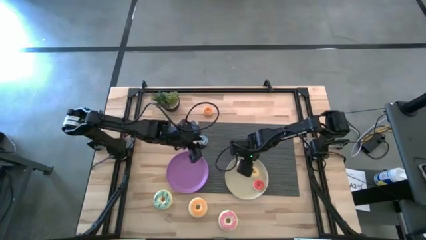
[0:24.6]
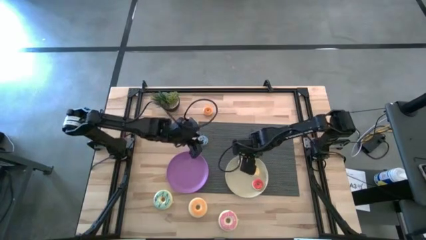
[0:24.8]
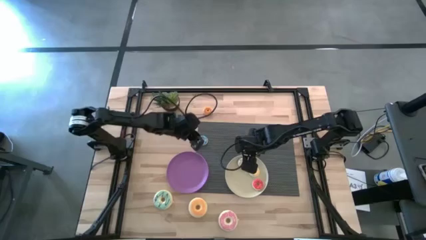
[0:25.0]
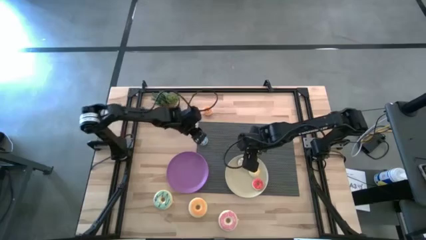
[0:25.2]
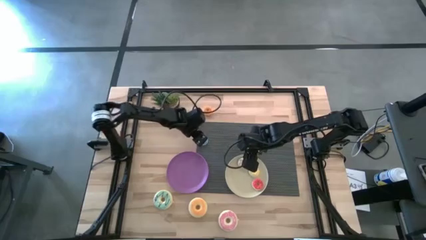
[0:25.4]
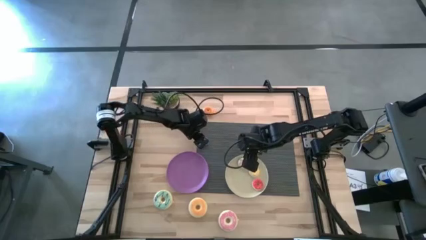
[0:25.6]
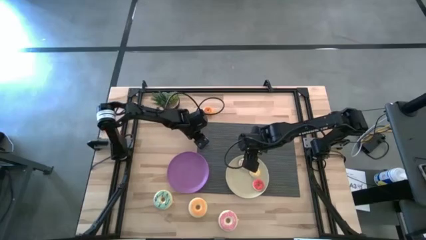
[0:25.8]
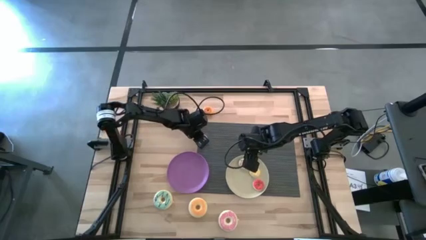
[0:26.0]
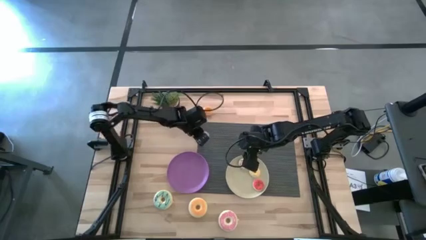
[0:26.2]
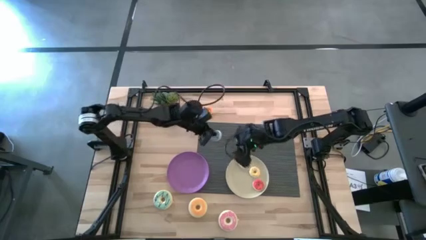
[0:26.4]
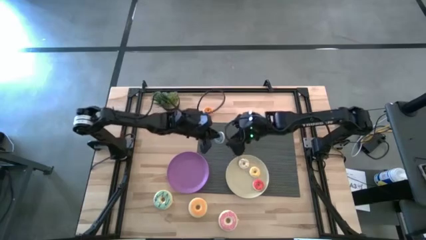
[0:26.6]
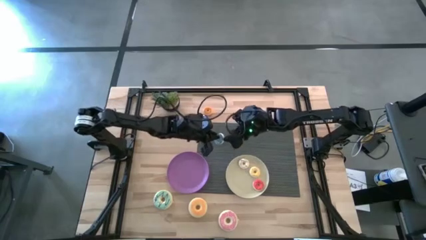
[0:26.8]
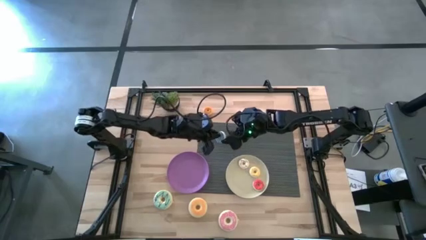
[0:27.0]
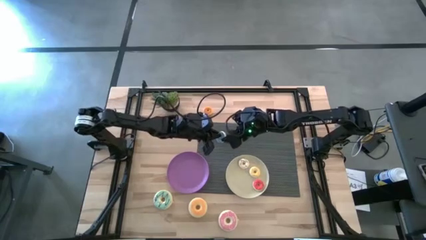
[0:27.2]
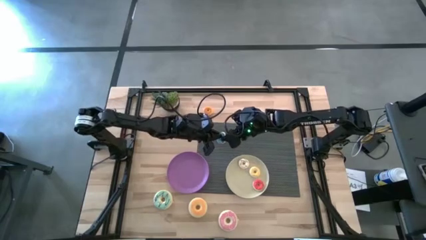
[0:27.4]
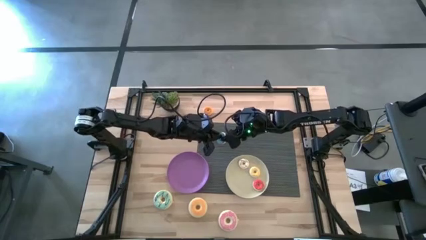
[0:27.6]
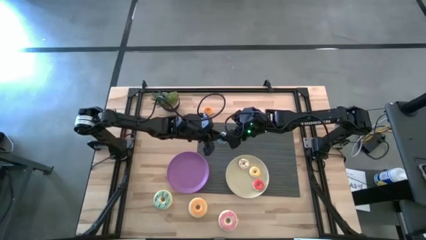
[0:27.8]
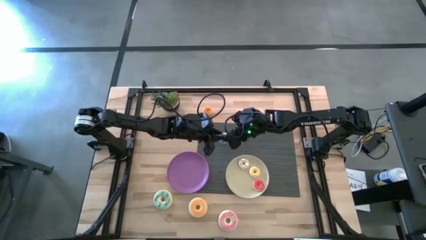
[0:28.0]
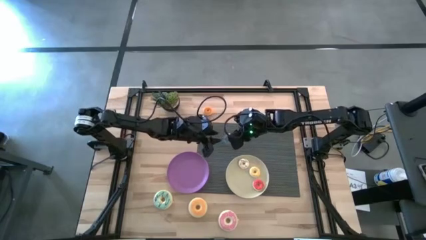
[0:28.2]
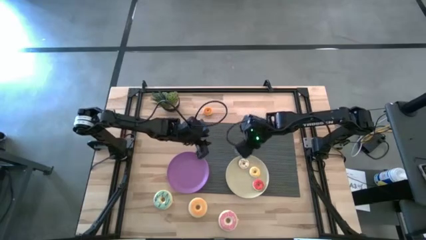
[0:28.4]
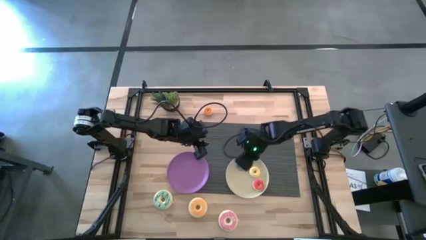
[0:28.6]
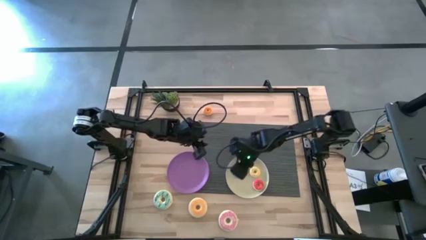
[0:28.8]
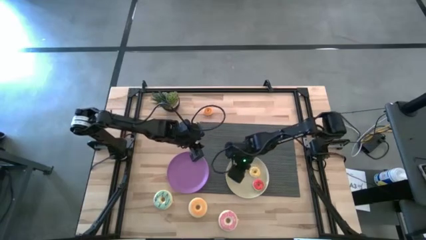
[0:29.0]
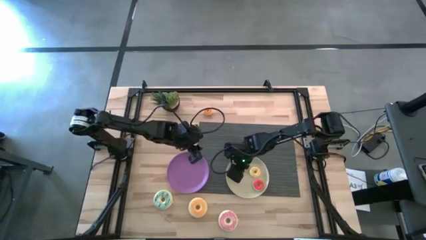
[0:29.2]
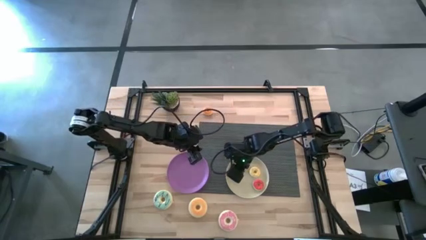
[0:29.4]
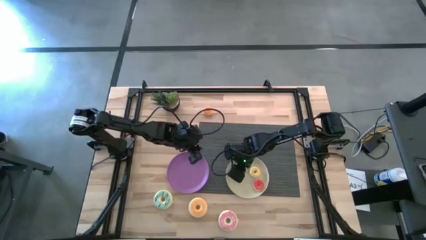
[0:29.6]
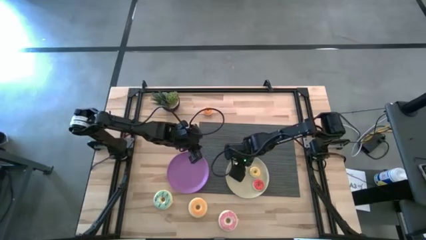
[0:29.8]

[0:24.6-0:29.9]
Task: Pick & Place donuts
Put the small blue donut on the white plate

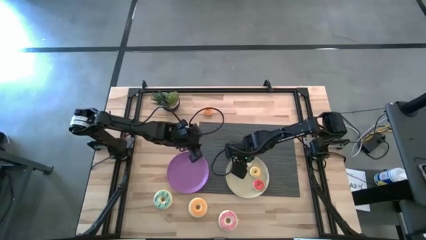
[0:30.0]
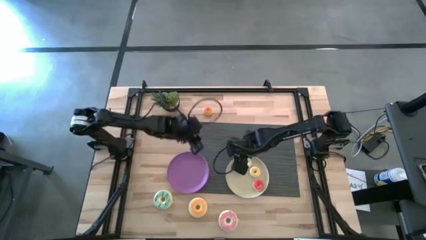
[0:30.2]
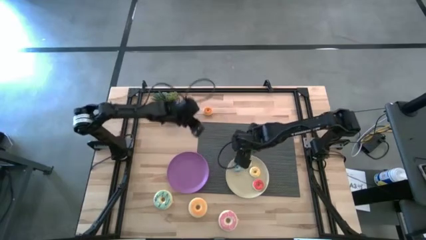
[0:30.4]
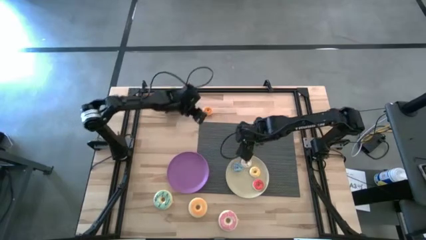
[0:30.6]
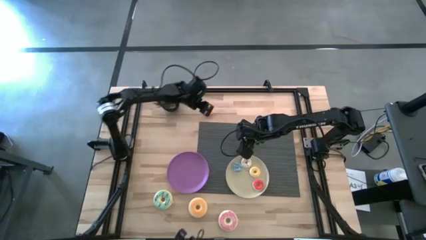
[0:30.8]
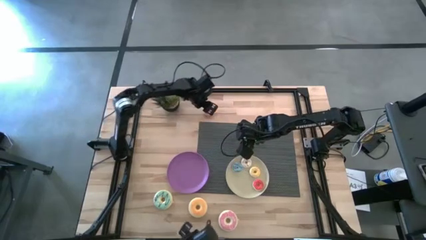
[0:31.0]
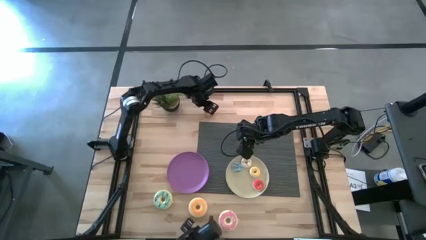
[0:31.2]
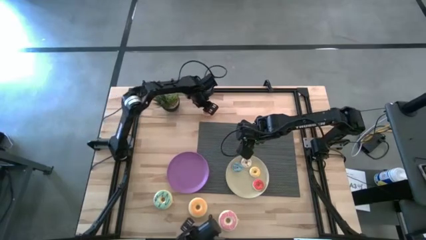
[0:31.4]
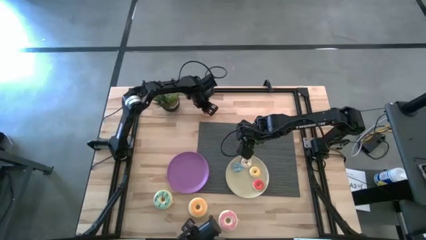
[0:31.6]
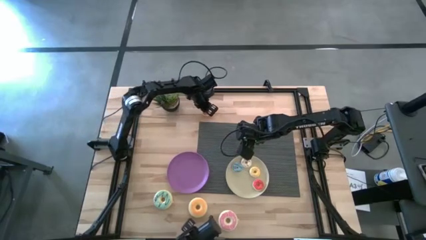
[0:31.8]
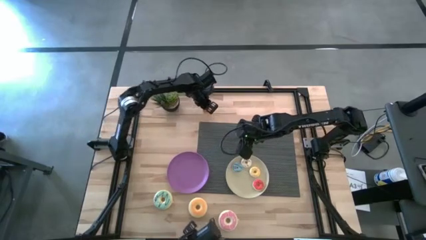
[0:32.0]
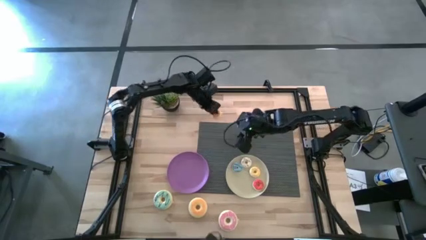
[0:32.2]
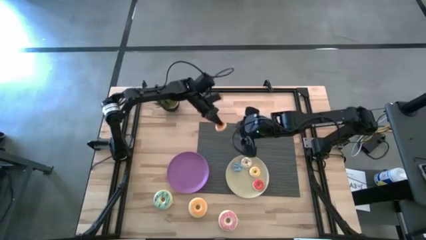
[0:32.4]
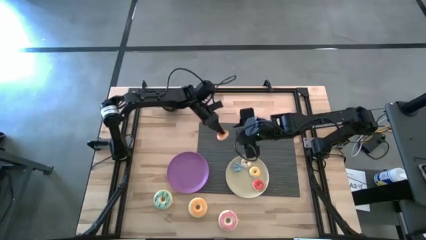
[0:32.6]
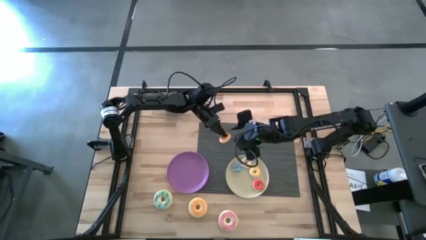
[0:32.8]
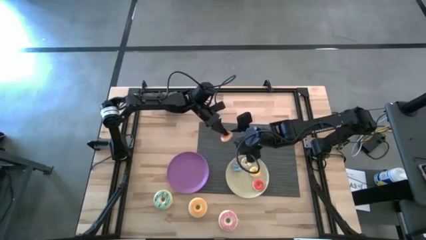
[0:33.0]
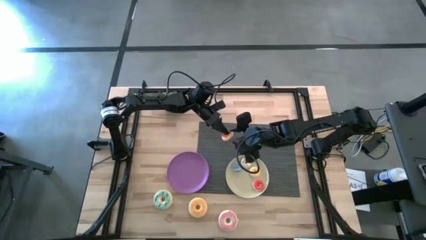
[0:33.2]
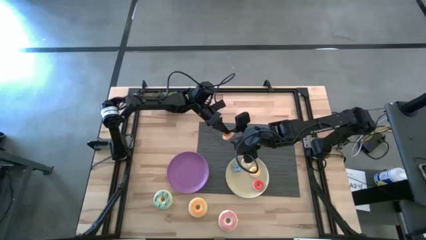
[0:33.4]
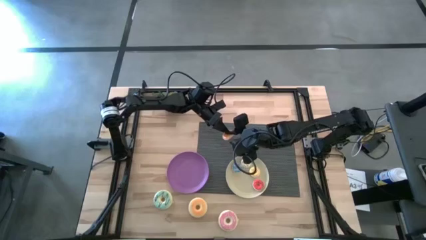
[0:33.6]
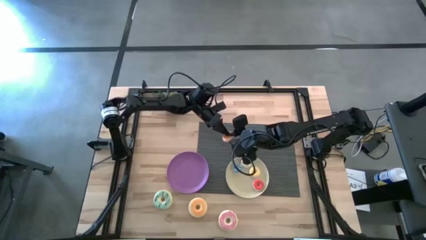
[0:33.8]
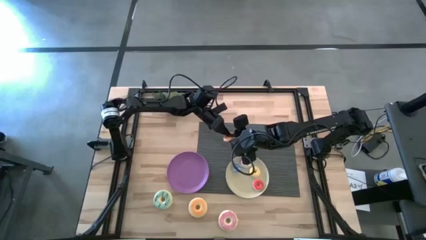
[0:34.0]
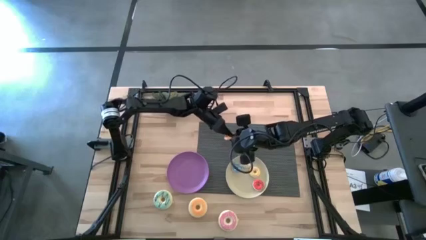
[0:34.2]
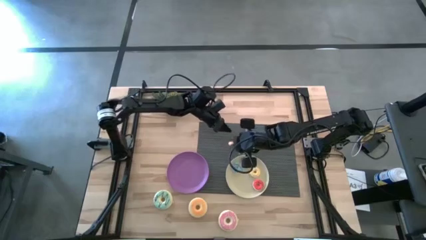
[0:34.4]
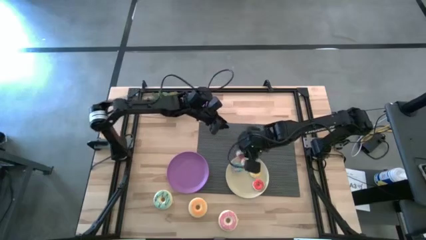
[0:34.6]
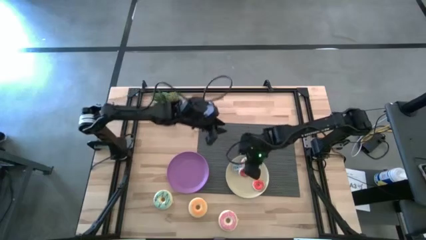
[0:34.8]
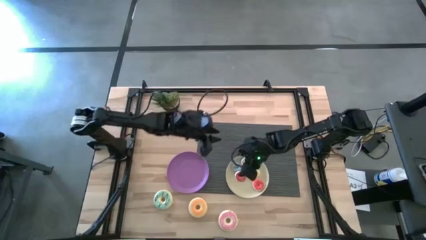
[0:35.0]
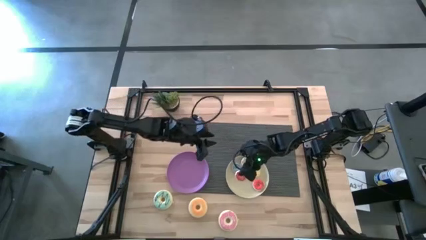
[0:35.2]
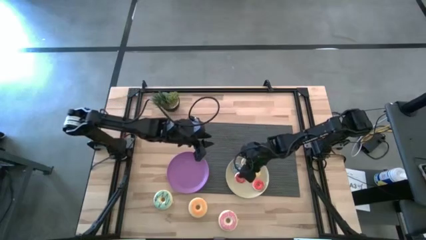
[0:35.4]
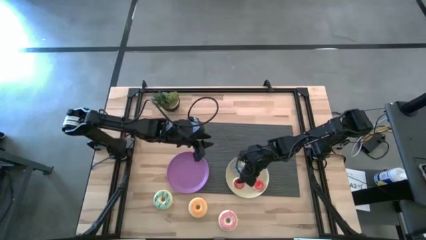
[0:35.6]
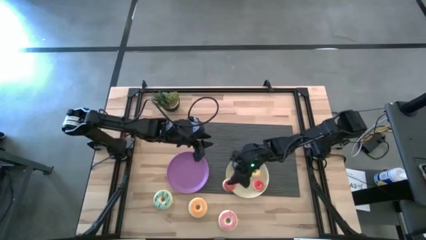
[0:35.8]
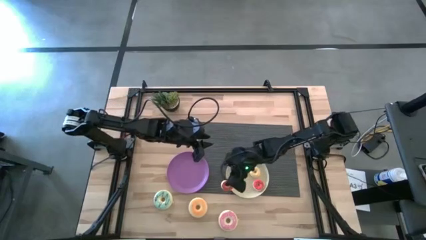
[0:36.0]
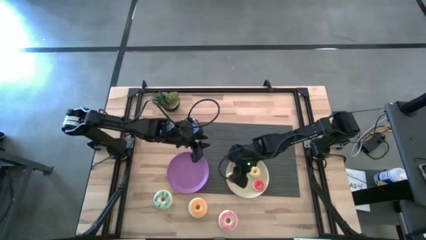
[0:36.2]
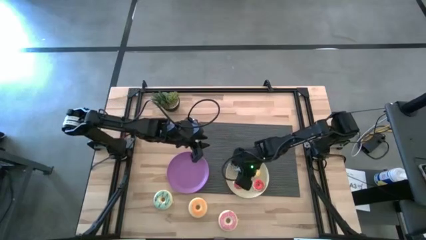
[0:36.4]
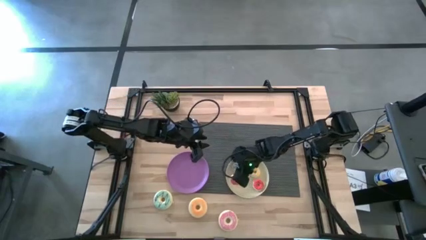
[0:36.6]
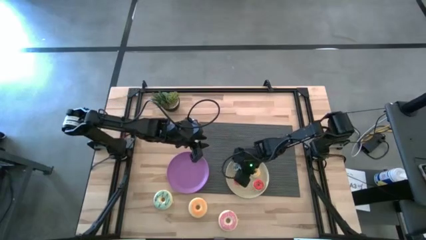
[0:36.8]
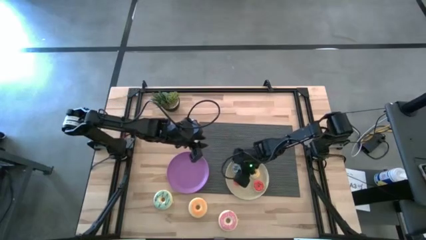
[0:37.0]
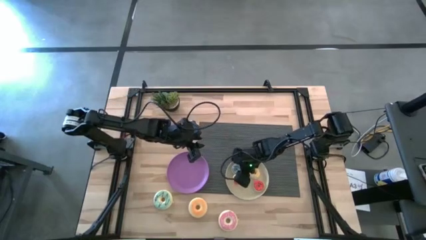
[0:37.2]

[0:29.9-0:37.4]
Put the small orange donut on the white plate

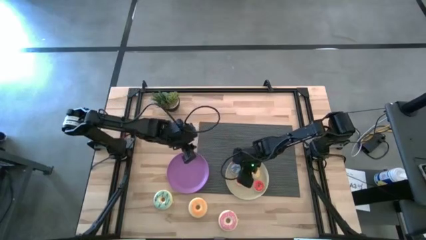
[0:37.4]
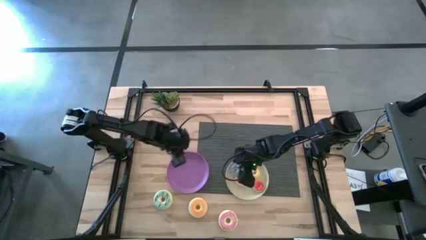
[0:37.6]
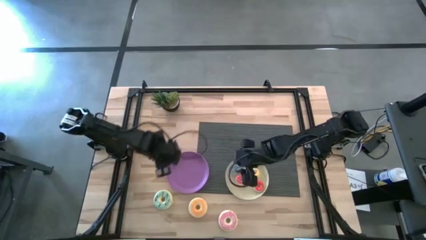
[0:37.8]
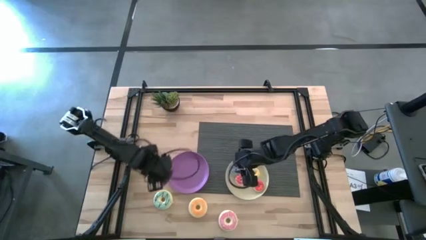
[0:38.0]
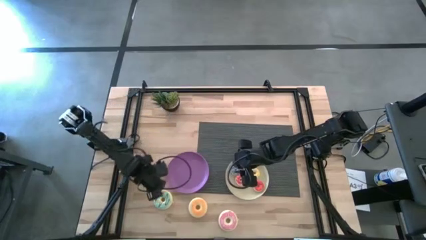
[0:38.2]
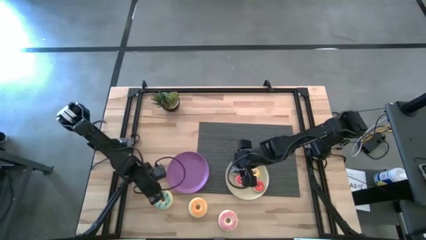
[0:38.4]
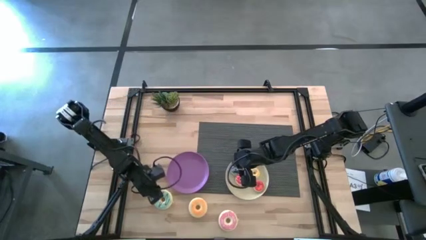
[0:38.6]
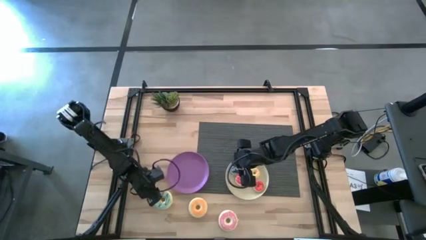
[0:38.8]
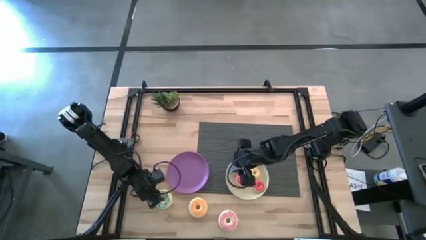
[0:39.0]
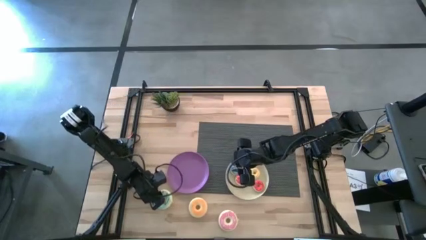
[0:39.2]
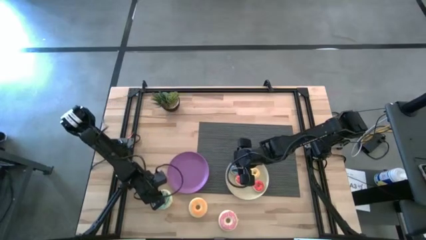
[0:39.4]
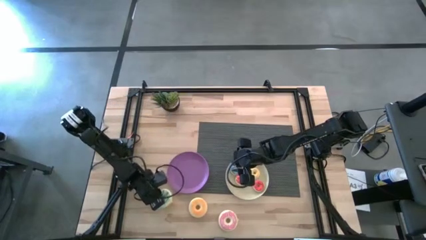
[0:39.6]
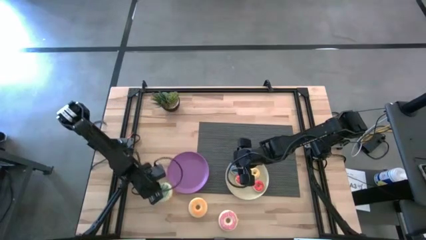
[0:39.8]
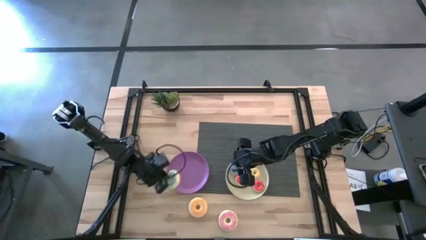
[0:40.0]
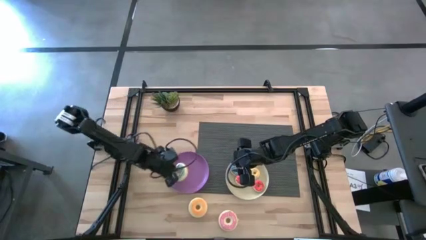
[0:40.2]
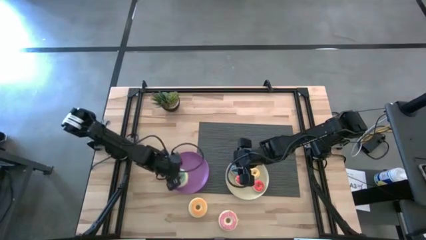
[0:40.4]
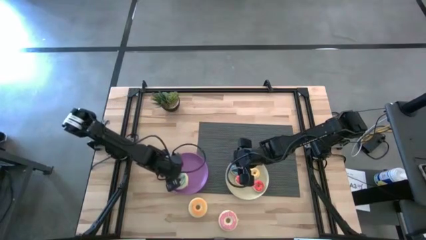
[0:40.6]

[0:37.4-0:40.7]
Put the large blue donut on the purple plate
